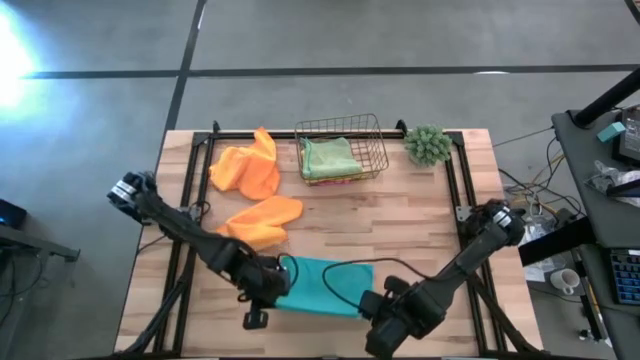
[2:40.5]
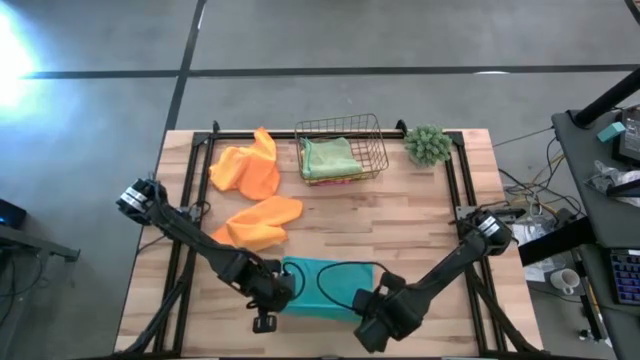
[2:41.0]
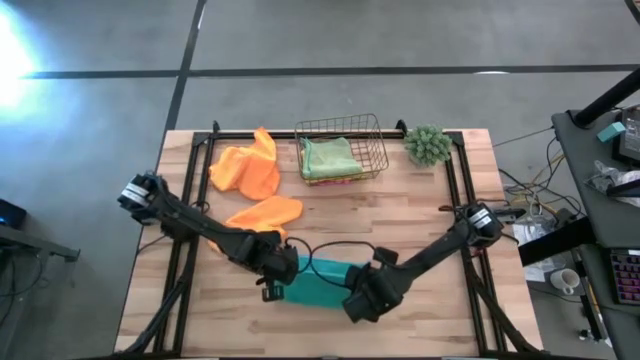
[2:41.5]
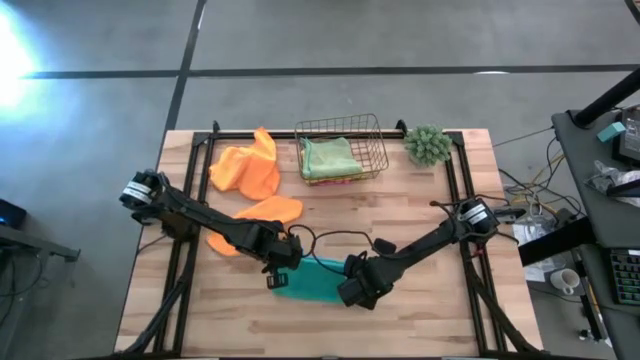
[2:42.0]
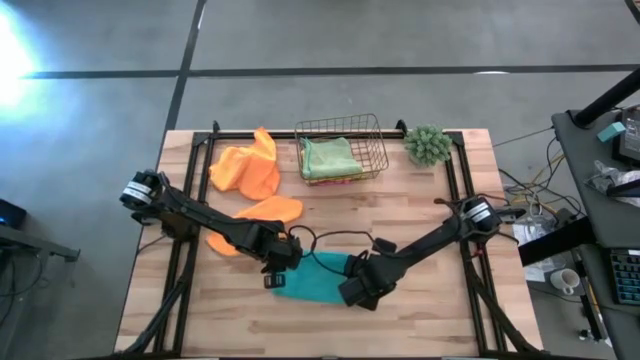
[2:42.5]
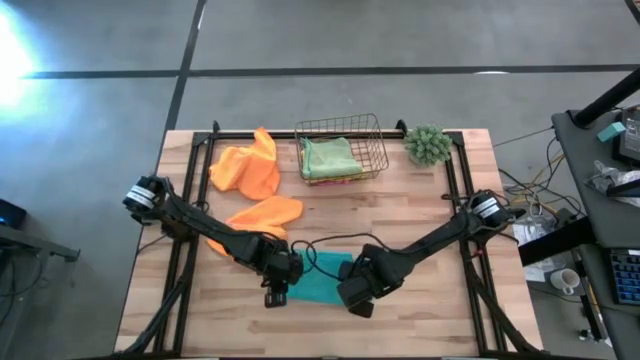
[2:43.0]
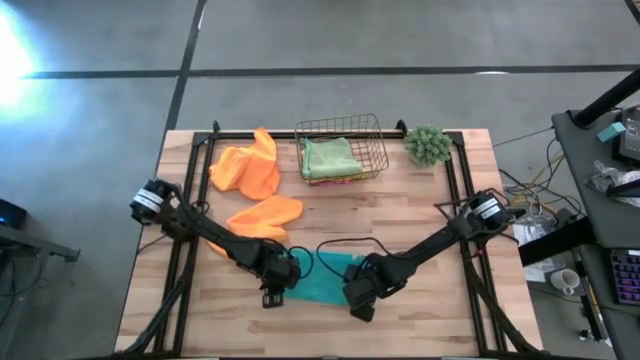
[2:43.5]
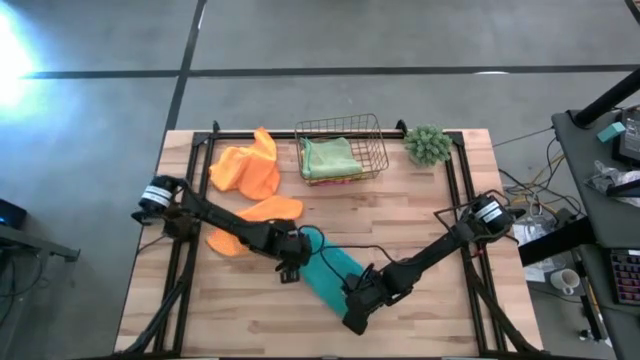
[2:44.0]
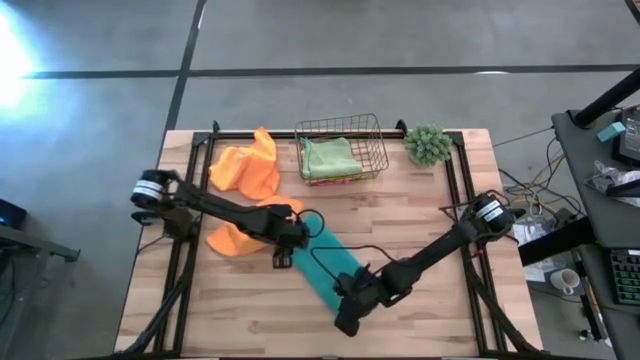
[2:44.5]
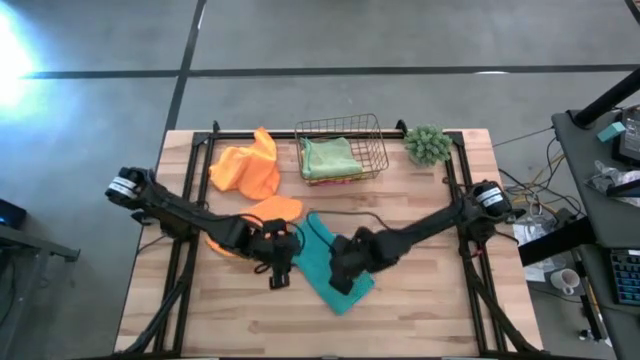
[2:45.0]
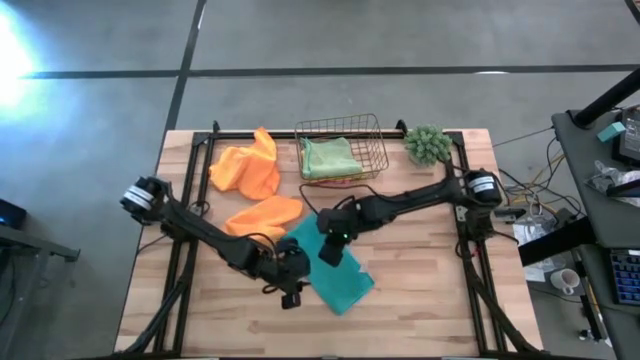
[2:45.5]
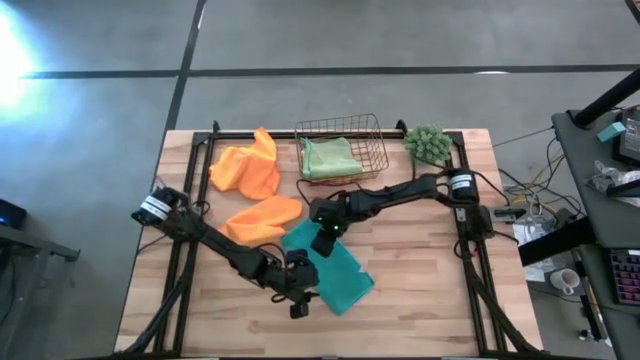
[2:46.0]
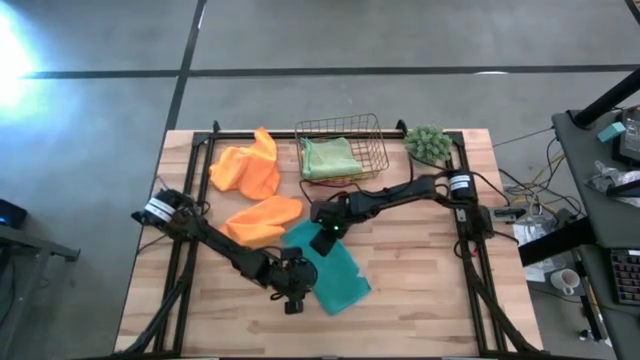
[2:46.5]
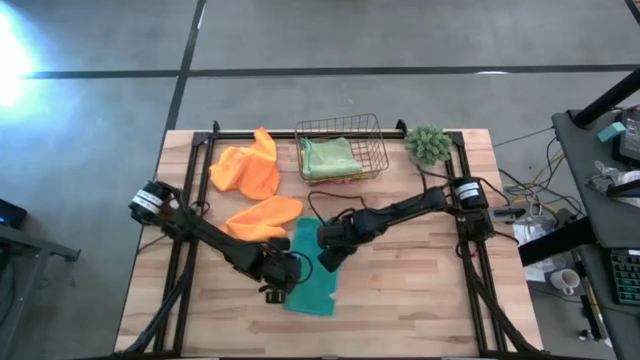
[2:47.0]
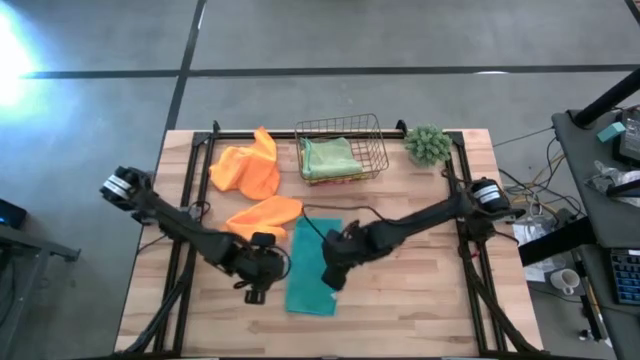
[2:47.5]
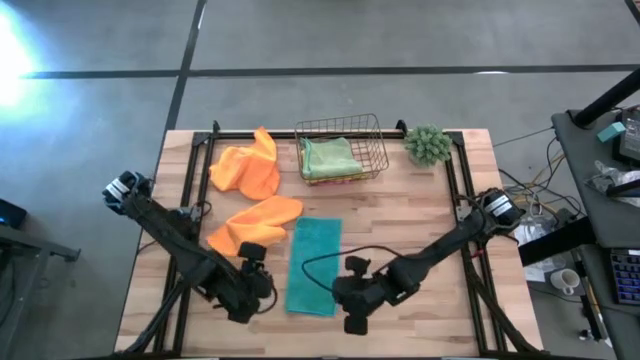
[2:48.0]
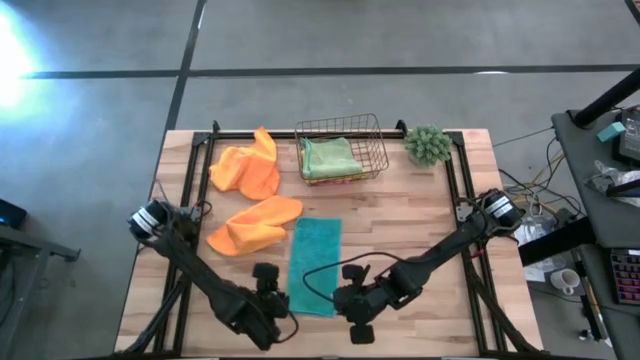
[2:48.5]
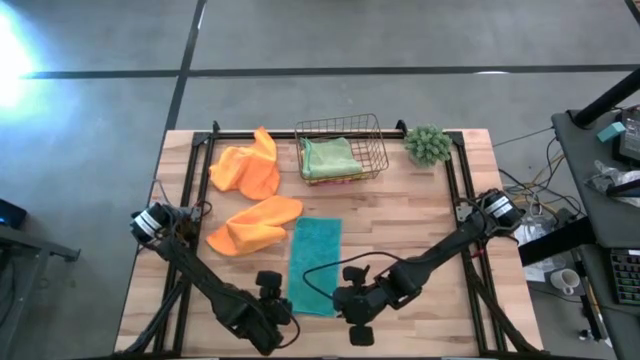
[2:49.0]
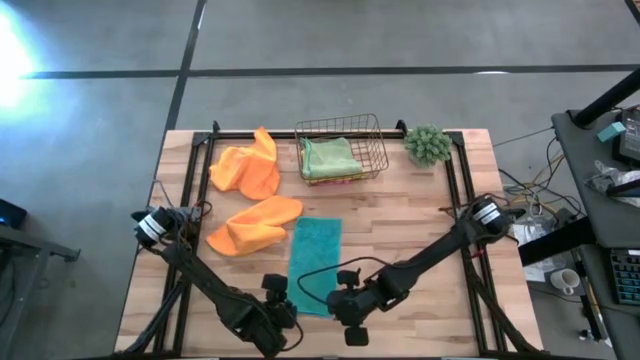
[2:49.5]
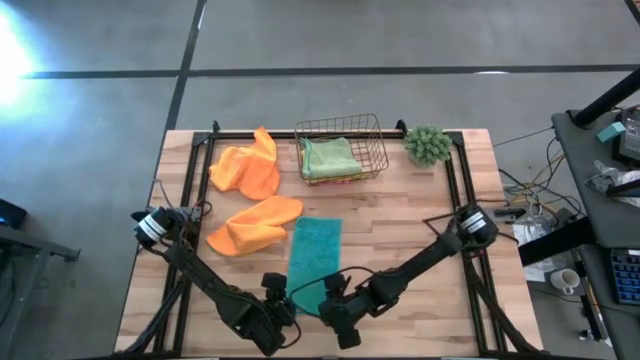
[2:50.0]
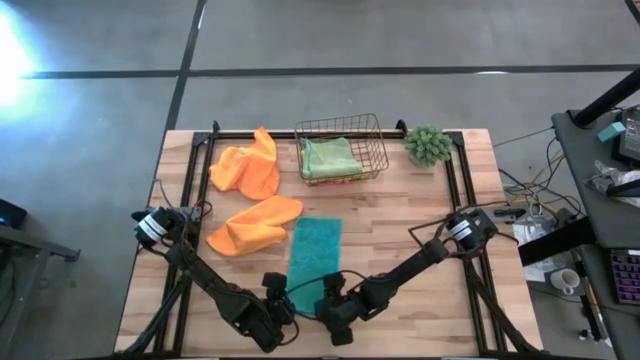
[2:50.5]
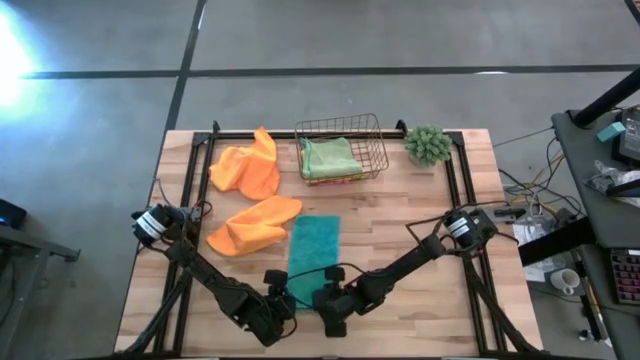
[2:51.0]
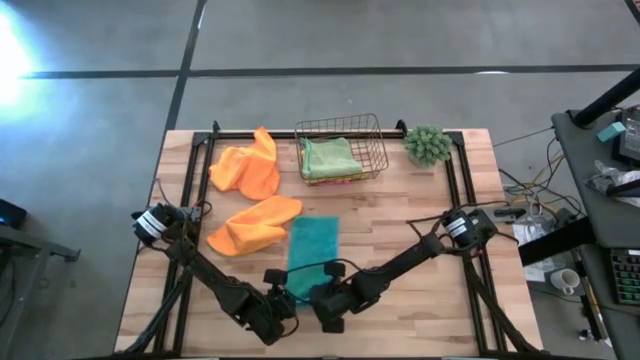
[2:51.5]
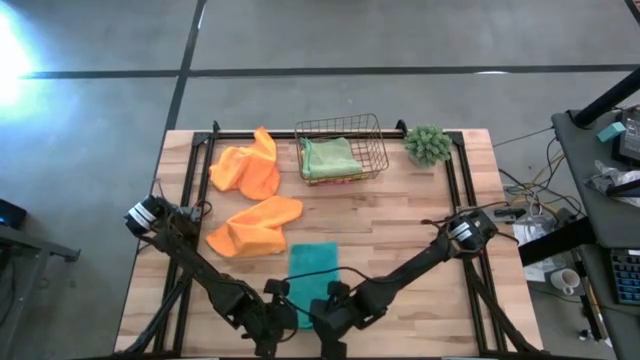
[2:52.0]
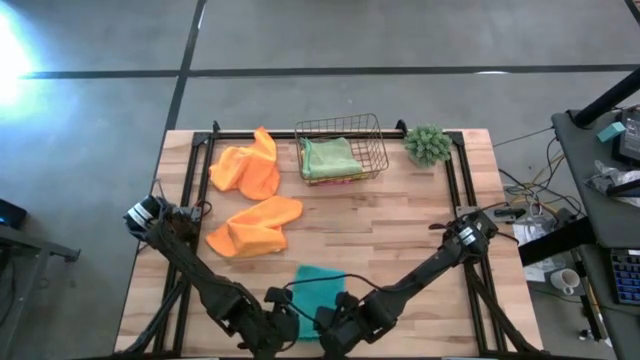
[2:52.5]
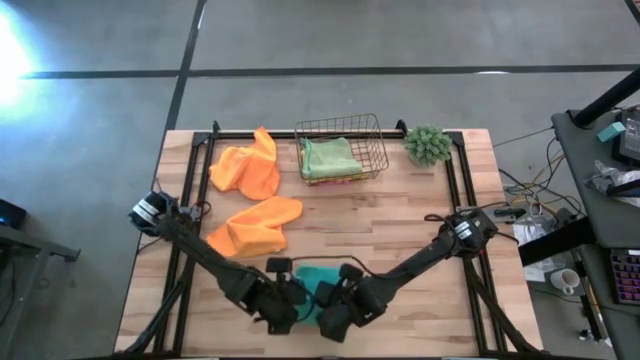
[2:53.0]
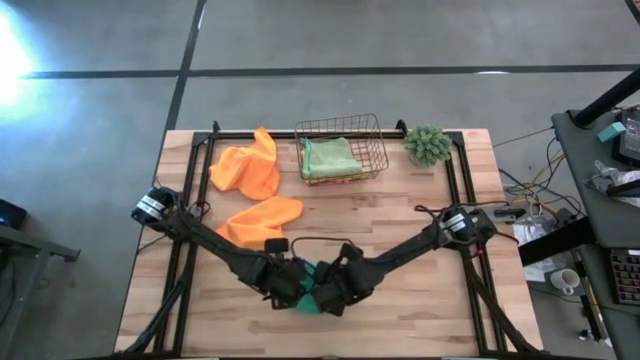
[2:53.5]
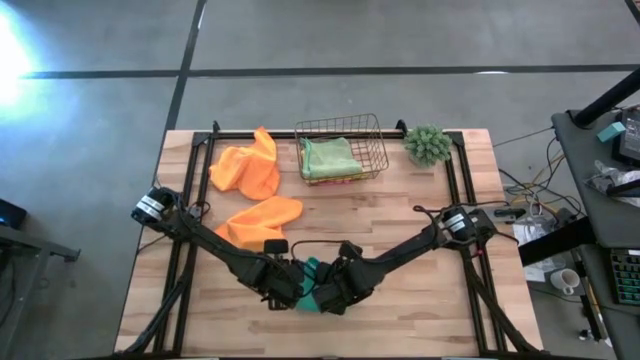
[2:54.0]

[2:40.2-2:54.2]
Task: Fold microfiber towels
Fold the blue microfiber cloth

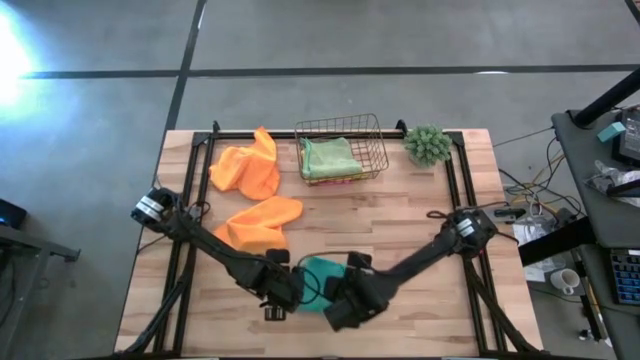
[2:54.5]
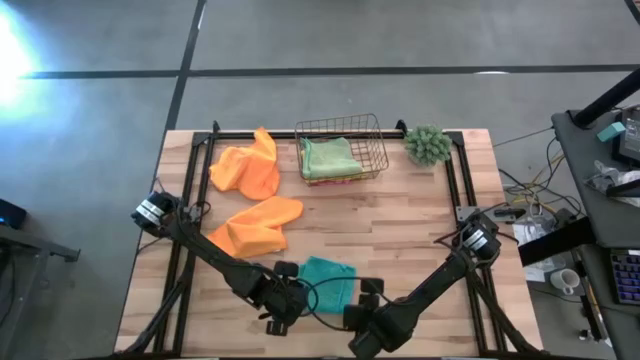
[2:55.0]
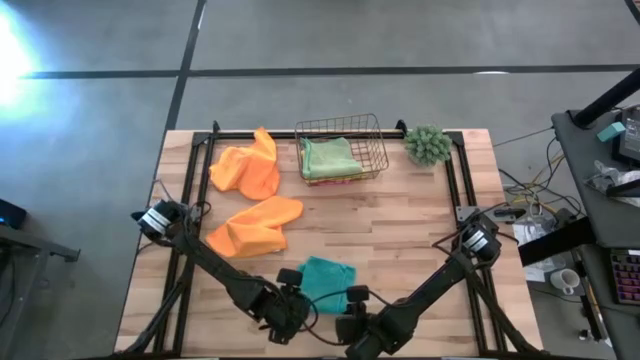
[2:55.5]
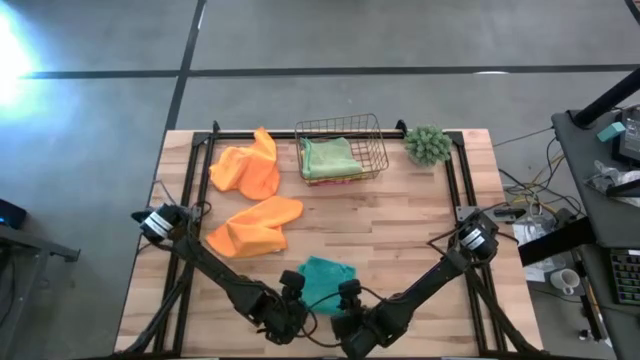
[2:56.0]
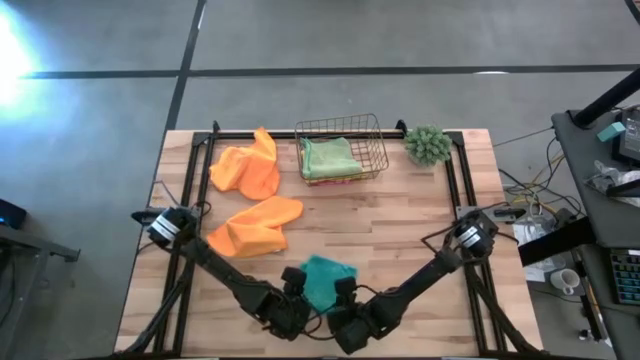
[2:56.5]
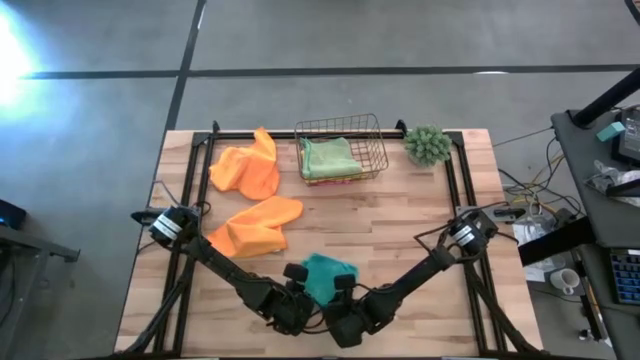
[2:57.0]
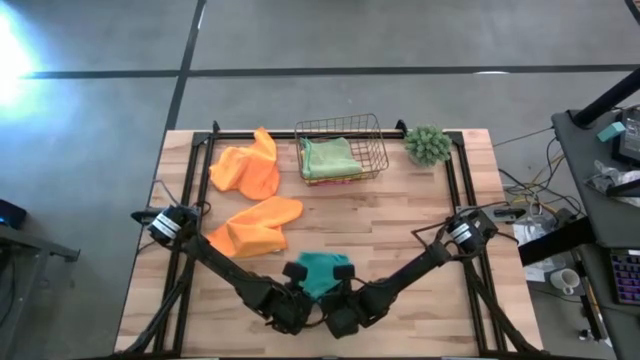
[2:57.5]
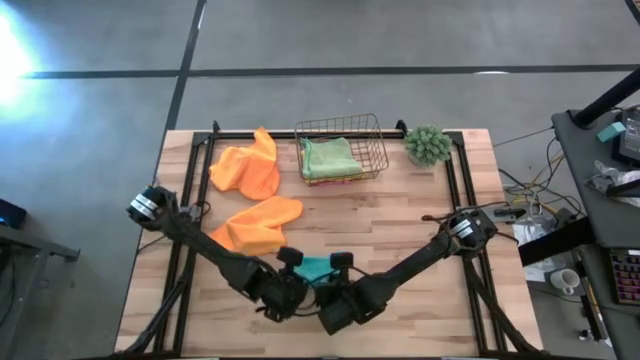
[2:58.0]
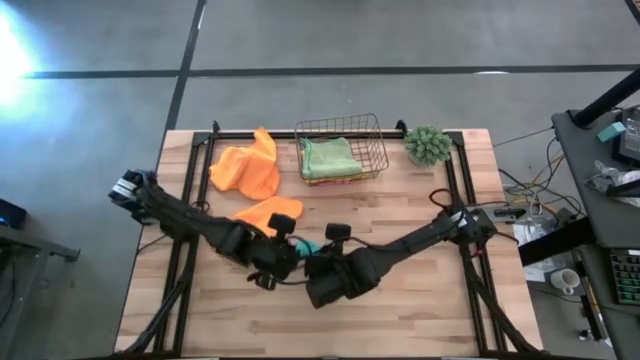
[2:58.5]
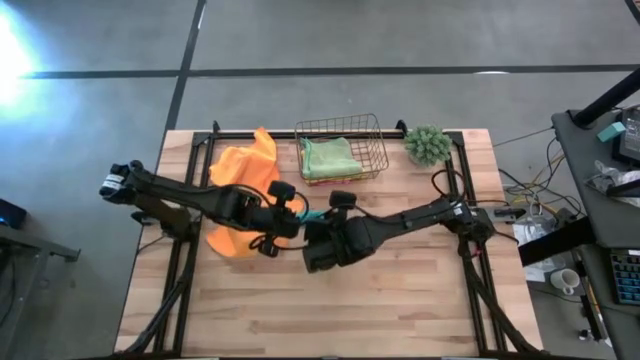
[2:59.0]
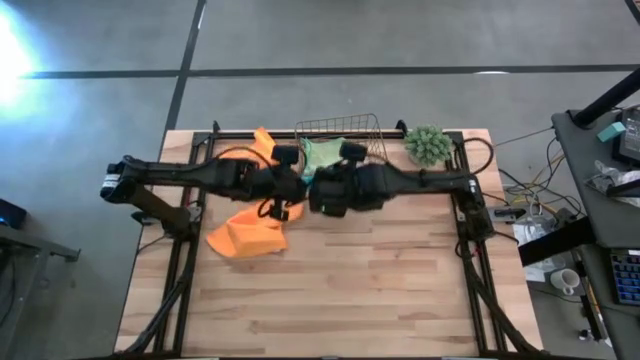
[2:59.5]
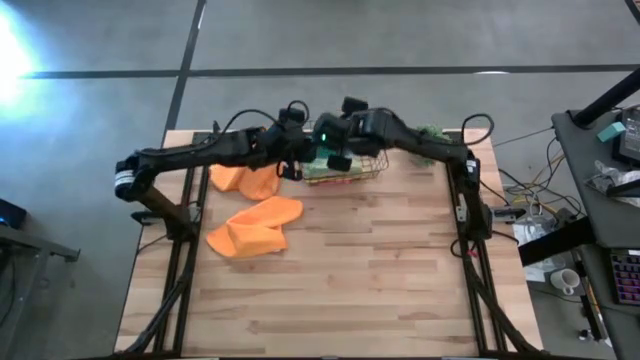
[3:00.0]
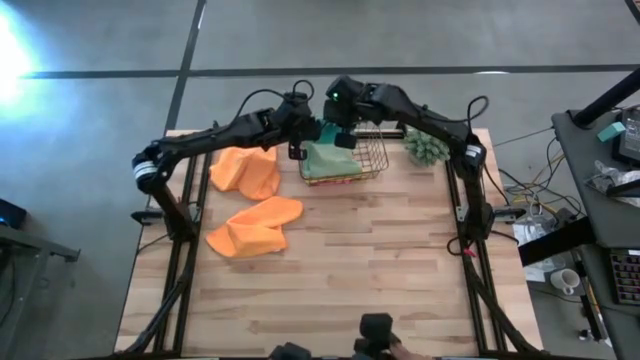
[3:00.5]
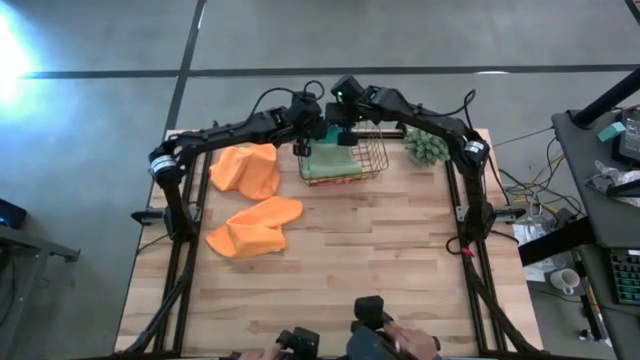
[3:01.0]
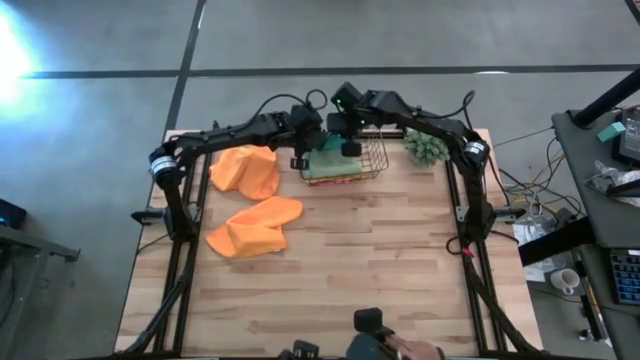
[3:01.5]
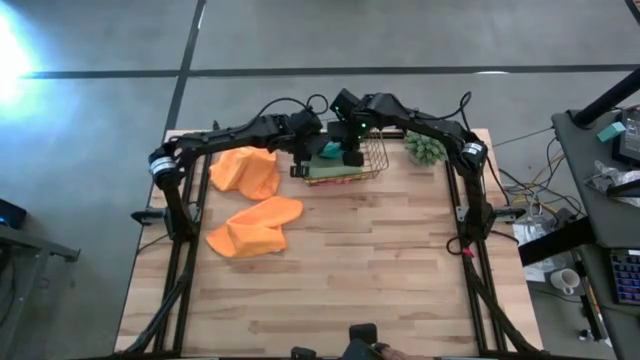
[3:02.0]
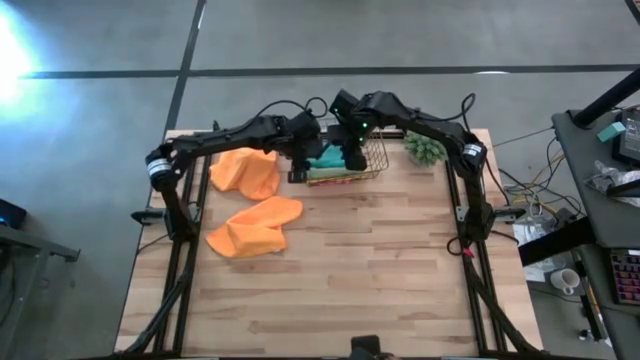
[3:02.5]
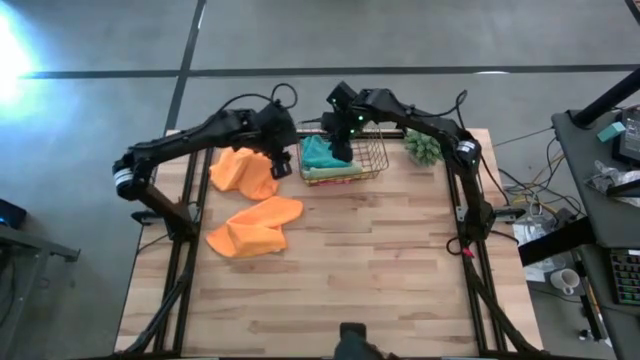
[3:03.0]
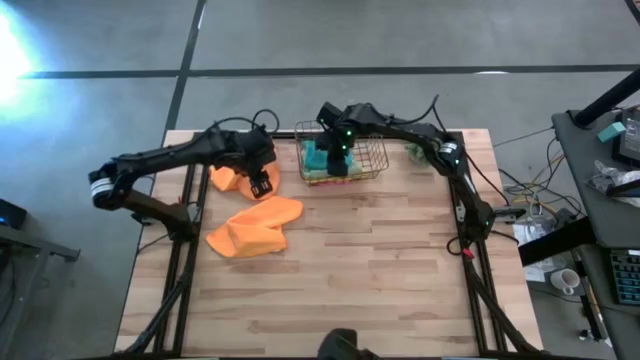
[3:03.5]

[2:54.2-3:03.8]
Put the folded blue microfiber cloth into the gold wire basket
